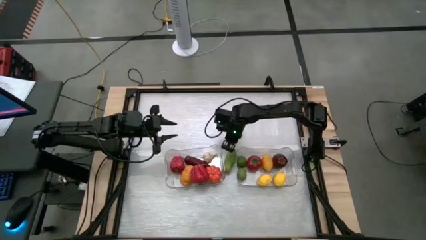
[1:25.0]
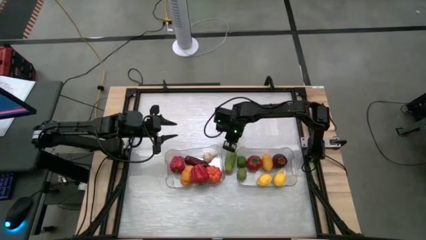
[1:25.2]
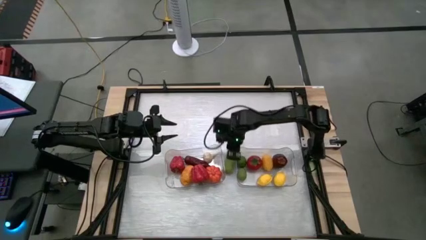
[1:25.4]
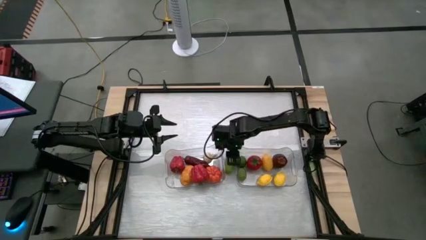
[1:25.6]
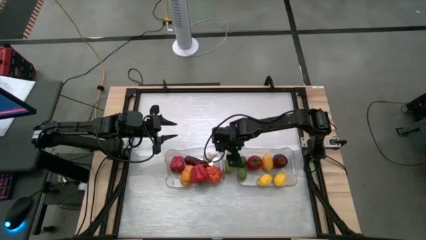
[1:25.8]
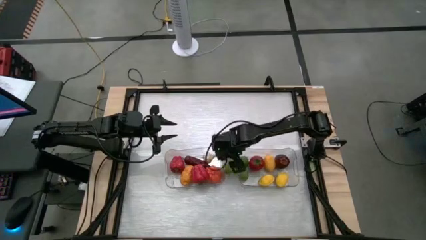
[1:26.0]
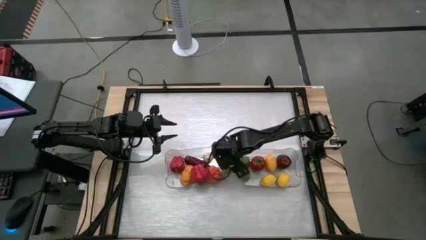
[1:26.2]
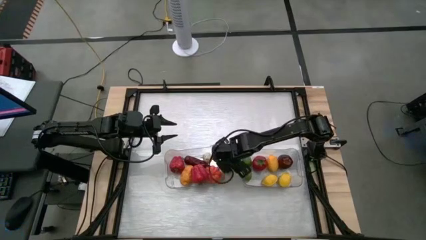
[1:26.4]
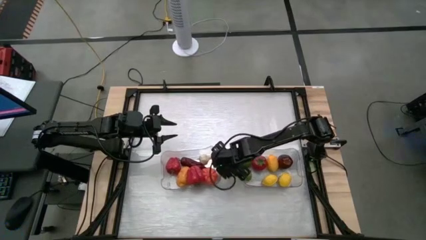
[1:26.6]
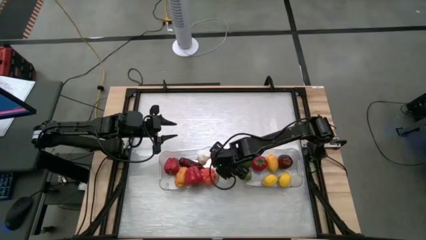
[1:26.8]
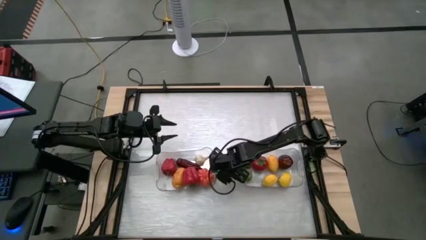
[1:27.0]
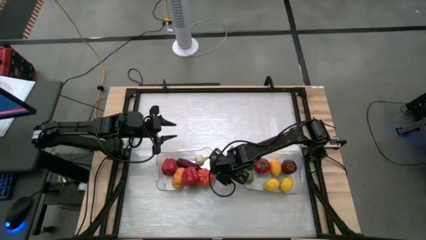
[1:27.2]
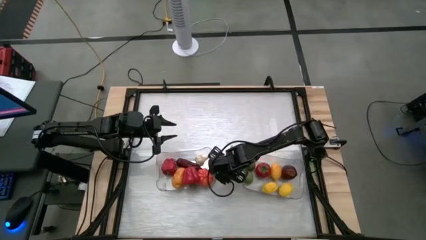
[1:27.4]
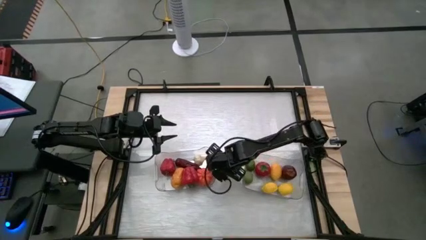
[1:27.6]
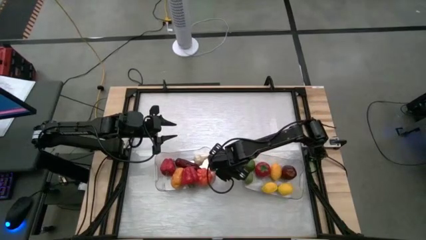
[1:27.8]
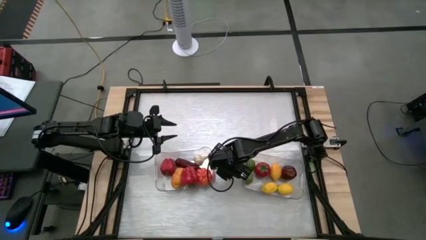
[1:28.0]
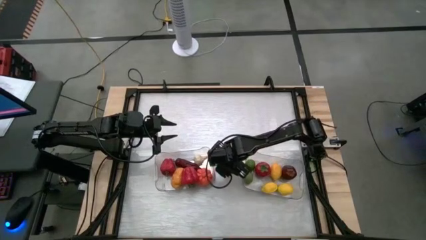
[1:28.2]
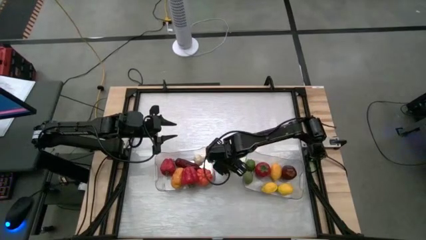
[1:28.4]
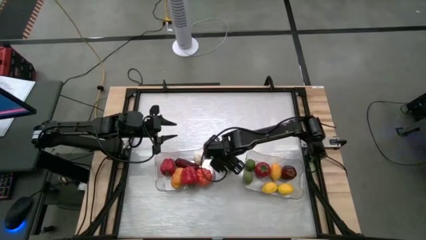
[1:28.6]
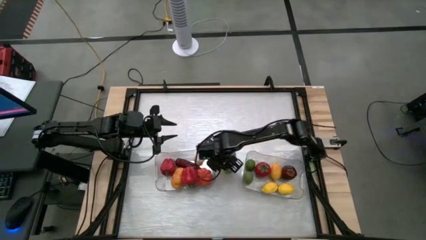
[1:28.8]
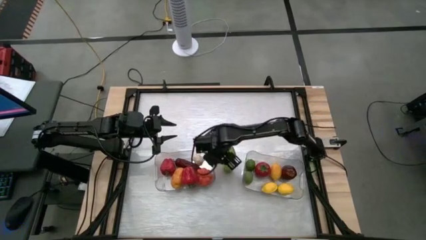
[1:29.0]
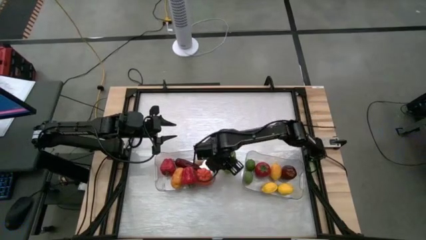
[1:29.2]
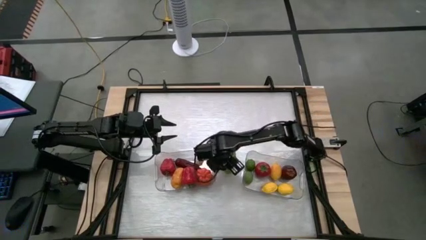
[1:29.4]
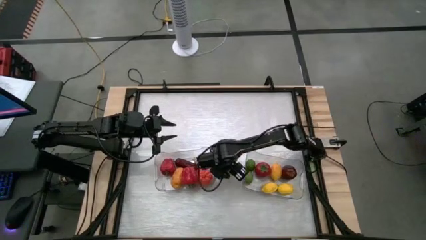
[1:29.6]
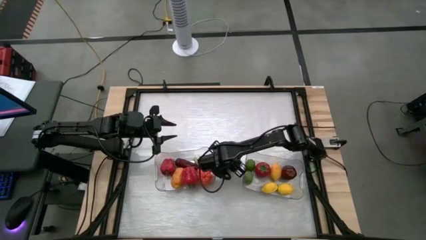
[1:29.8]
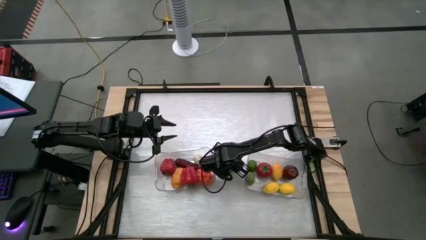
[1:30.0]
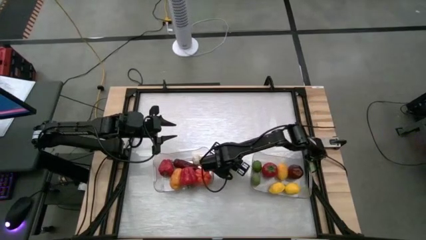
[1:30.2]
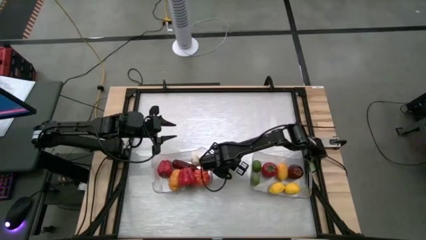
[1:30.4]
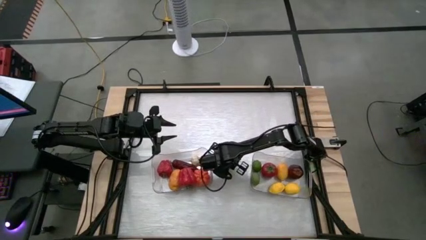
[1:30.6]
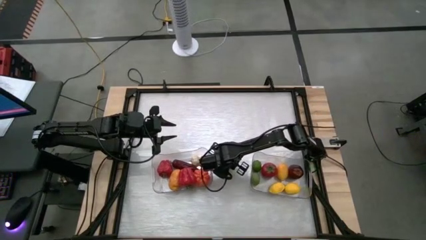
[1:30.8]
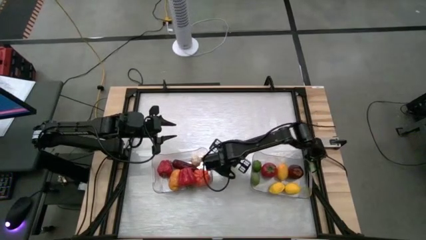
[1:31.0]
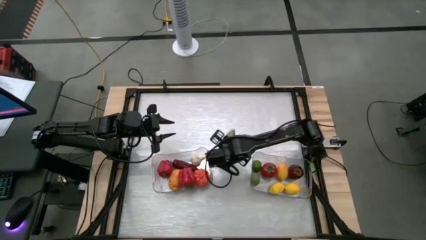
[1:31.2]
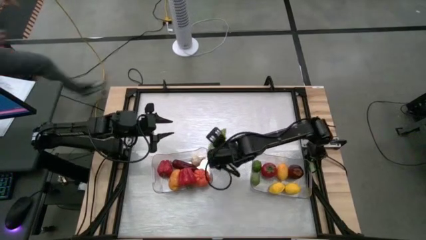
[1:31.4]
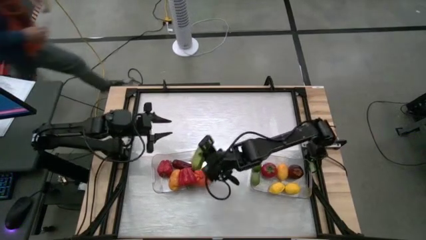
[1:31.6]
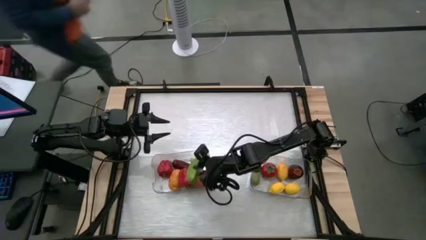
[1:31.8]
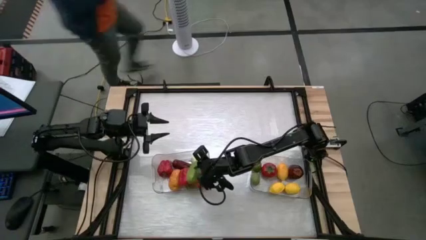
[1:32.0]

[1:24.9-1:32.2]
Task: Sort produce into baskets
Put the cucumber into the left transparent bin

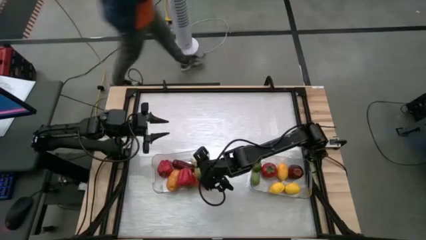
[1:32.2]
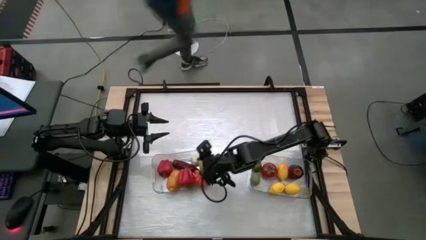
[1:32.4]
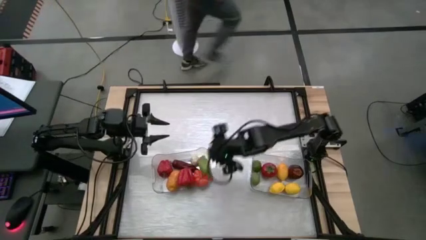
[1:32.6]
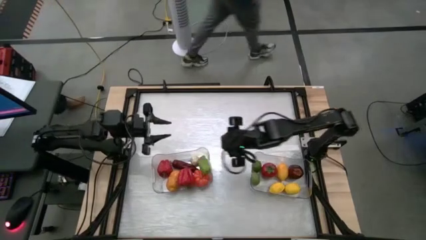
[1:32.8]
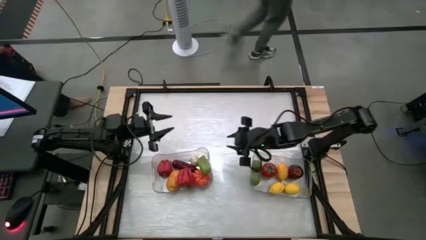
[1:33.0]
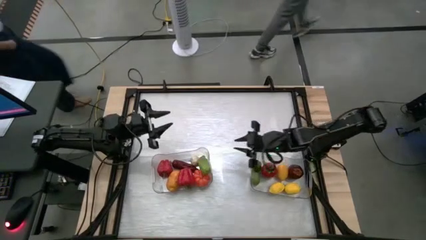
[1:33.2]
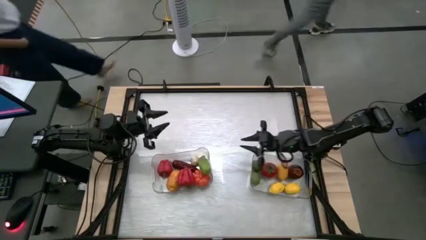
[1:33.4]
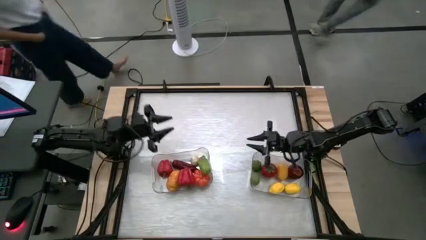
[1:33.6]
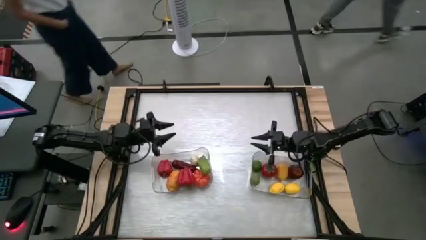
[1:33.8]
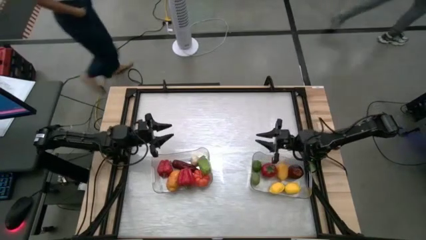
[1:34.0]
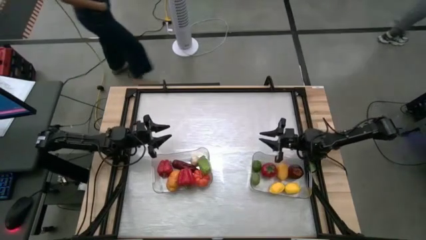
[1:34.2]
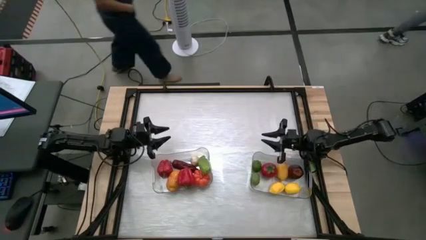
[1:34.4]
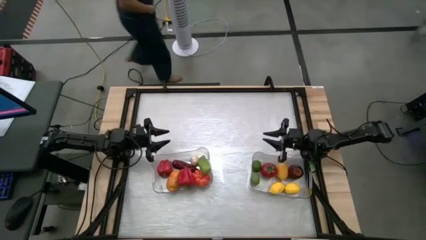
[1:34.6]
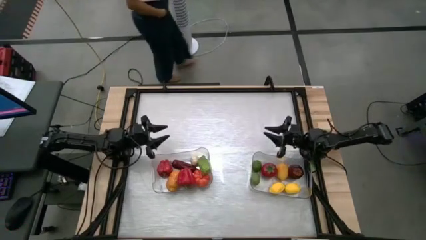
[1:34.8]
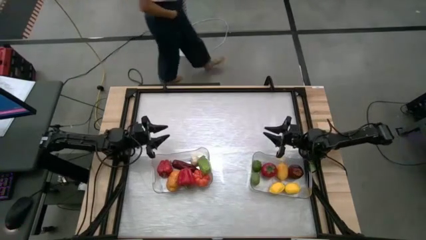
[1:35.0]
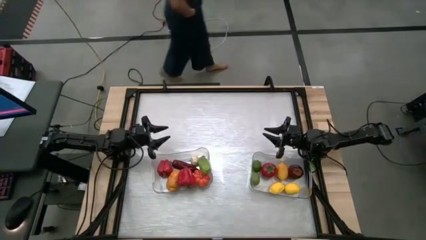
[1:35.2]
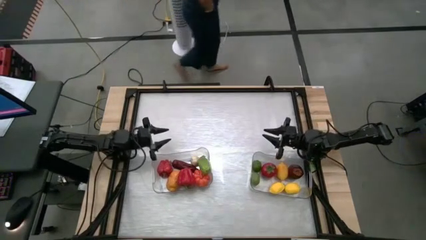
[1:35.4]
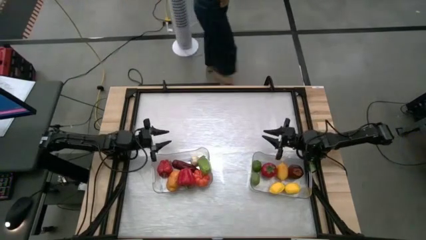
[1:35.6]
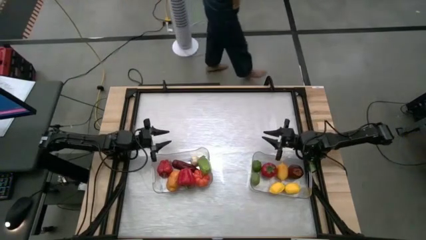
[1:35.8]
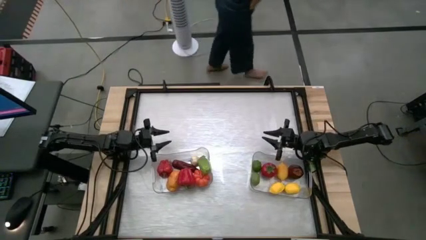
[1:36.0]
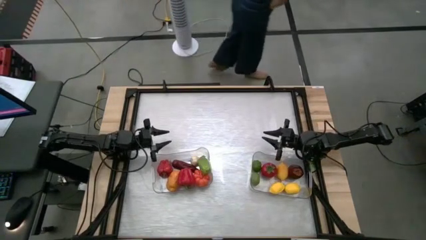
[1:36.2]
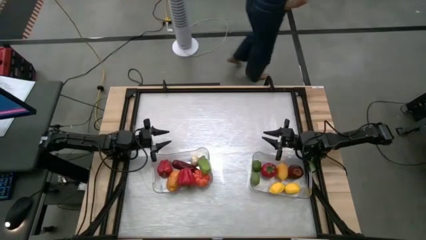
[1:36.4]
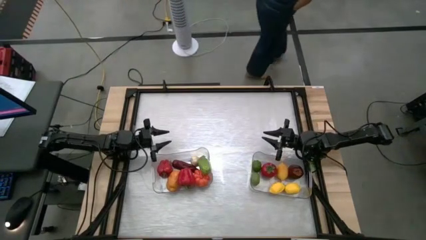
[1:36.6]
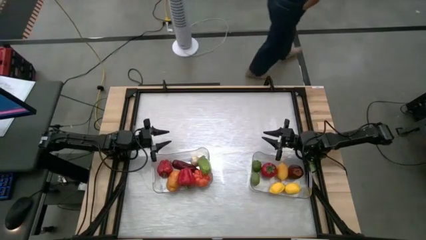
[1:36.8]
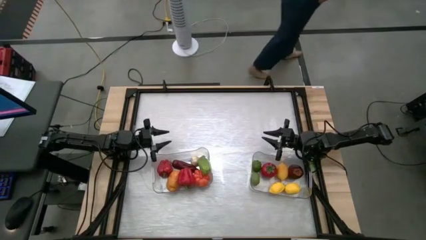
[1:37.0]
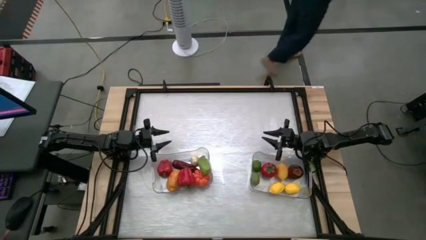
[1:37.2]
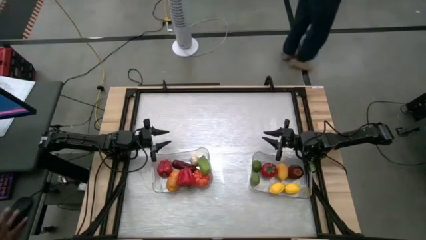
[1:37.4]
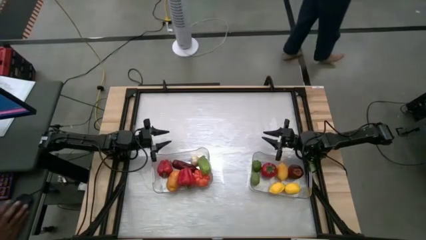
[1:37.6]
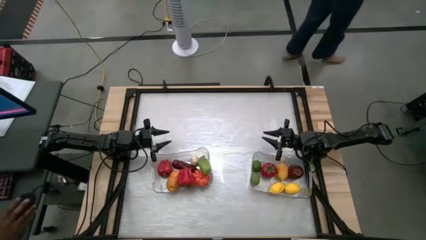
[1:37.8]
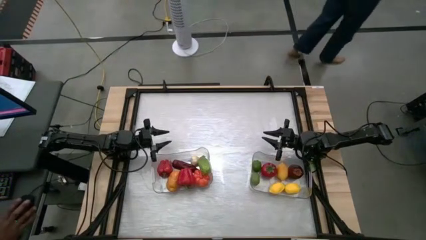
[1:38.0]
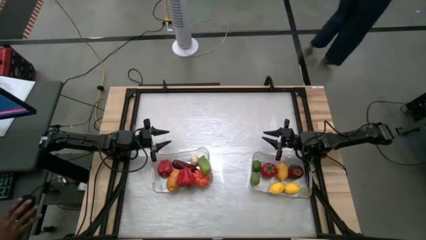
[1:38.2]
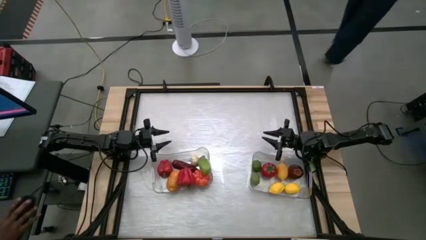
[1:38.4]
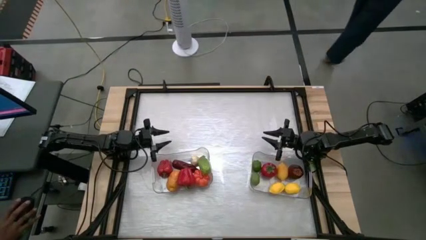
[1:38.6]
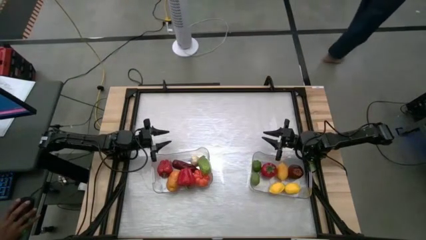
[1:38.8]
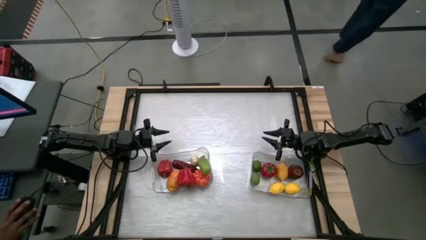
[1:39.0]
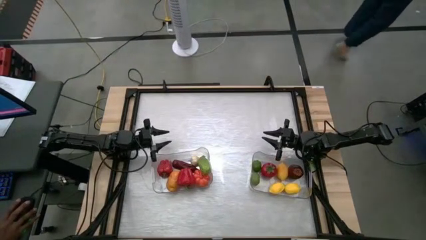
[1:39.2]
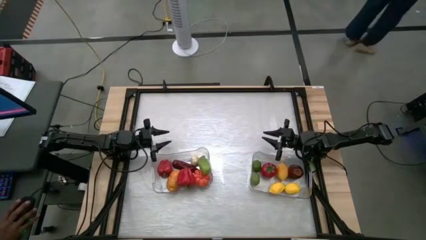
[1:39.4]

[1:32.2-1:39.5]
Return to Home Position
